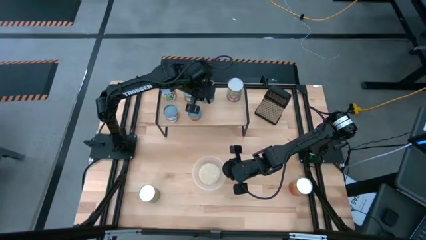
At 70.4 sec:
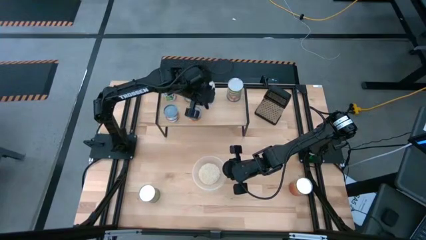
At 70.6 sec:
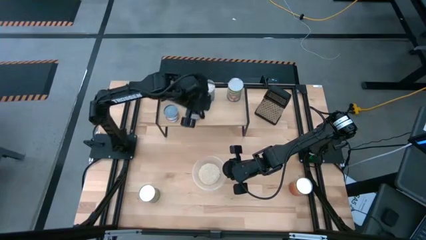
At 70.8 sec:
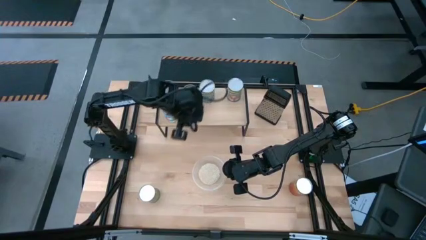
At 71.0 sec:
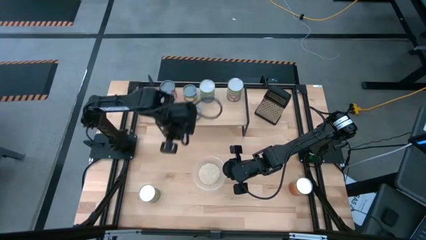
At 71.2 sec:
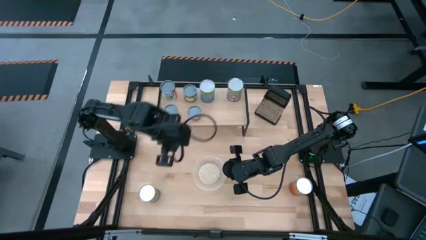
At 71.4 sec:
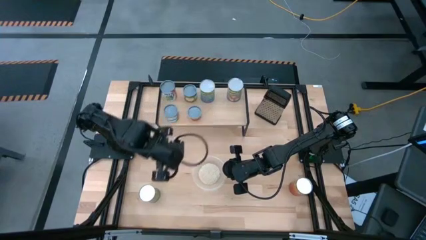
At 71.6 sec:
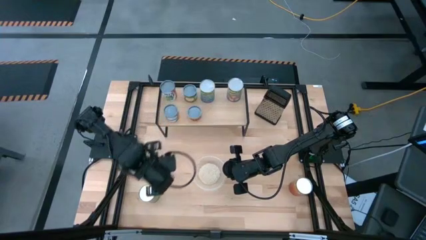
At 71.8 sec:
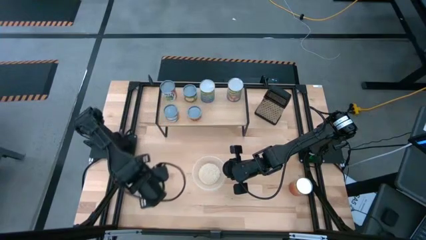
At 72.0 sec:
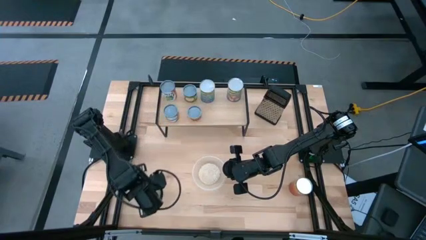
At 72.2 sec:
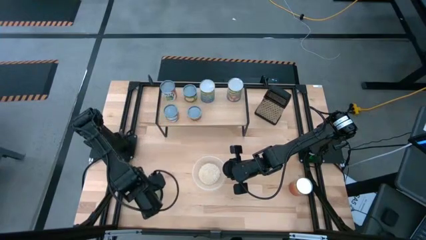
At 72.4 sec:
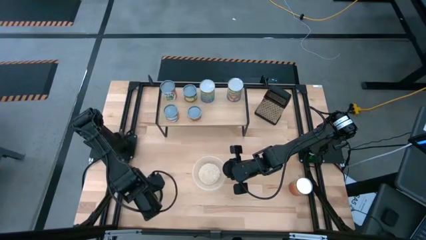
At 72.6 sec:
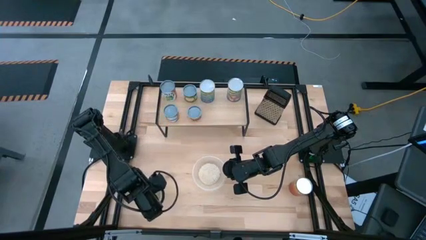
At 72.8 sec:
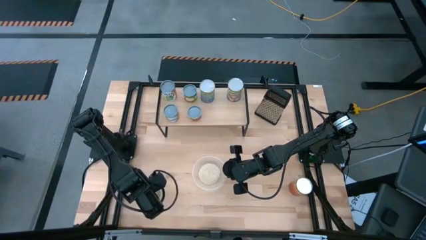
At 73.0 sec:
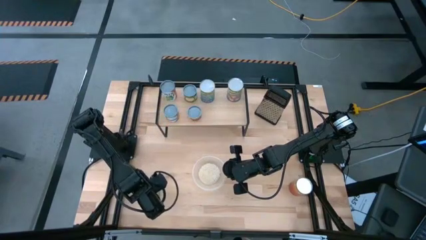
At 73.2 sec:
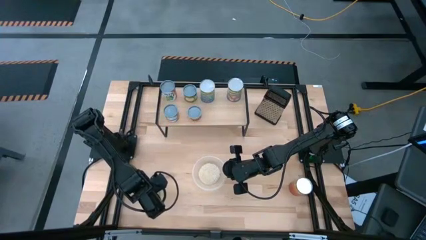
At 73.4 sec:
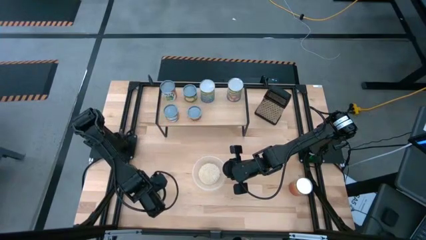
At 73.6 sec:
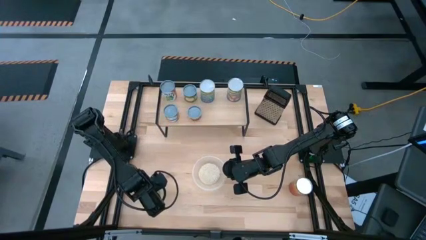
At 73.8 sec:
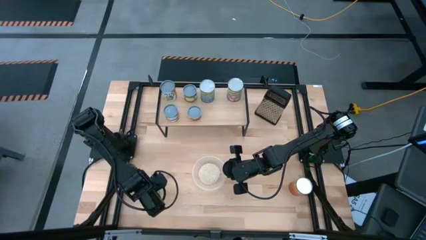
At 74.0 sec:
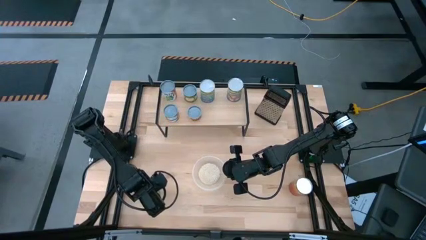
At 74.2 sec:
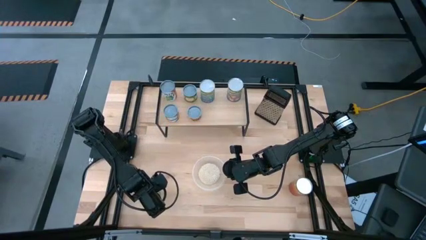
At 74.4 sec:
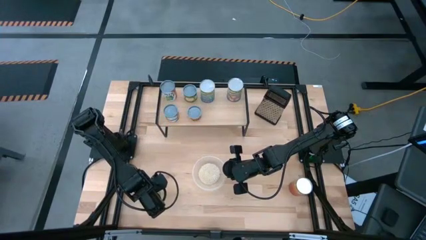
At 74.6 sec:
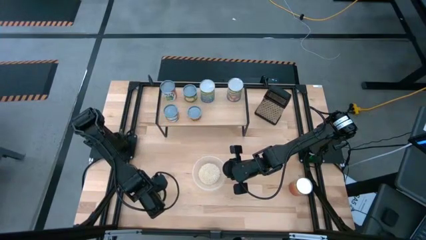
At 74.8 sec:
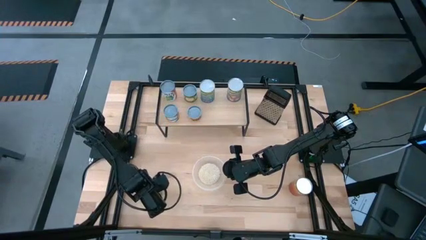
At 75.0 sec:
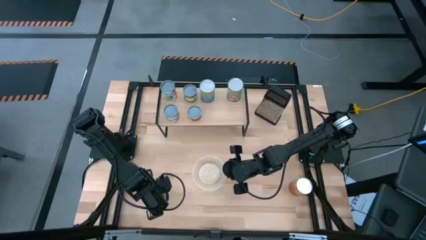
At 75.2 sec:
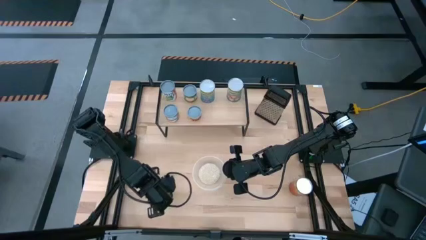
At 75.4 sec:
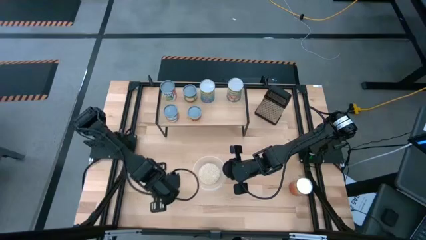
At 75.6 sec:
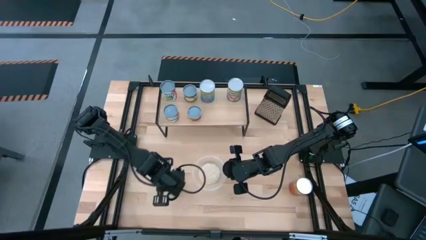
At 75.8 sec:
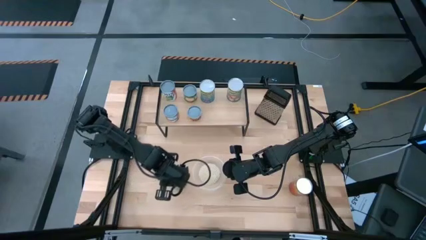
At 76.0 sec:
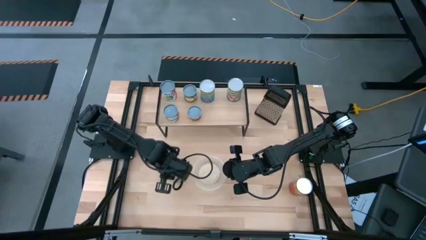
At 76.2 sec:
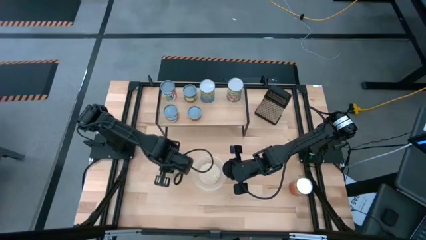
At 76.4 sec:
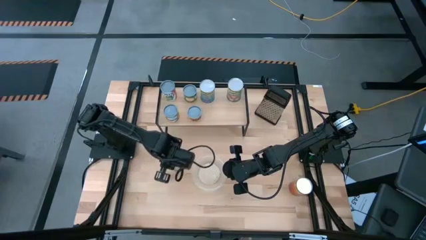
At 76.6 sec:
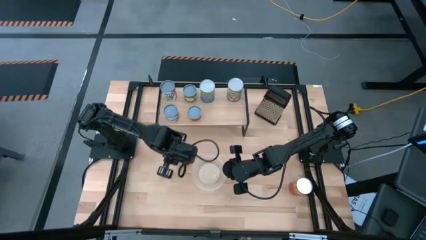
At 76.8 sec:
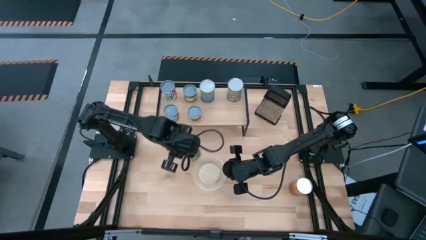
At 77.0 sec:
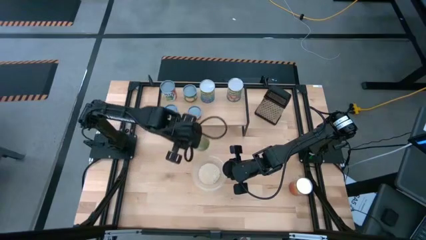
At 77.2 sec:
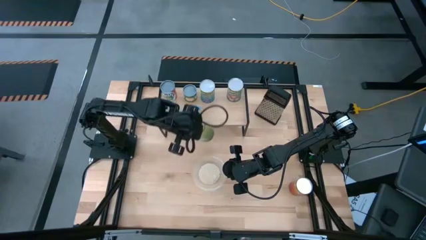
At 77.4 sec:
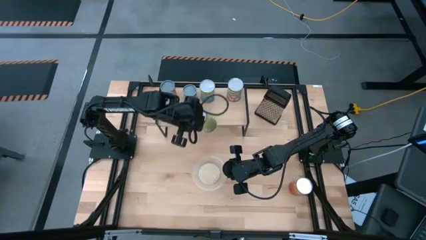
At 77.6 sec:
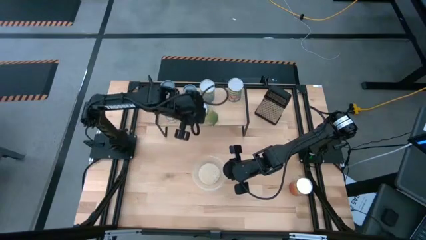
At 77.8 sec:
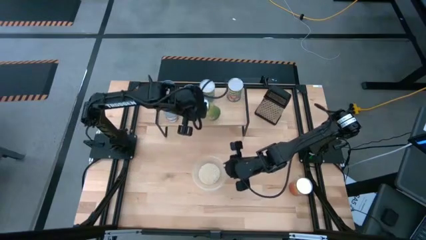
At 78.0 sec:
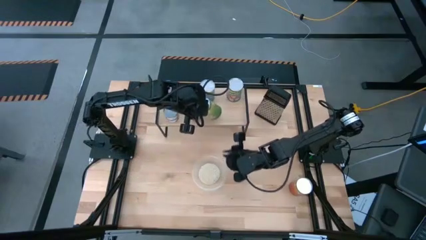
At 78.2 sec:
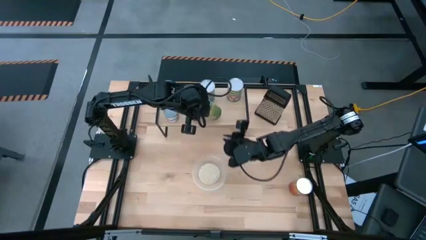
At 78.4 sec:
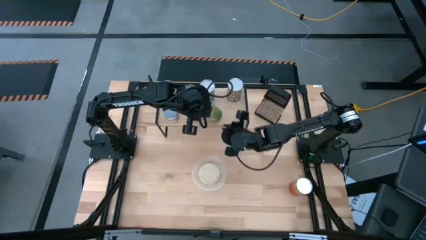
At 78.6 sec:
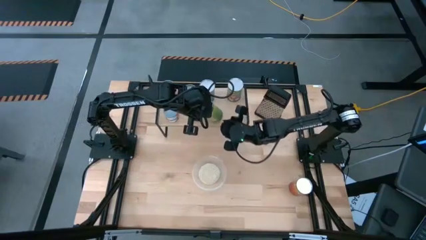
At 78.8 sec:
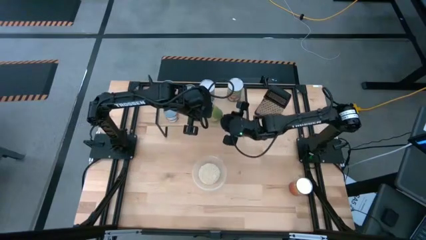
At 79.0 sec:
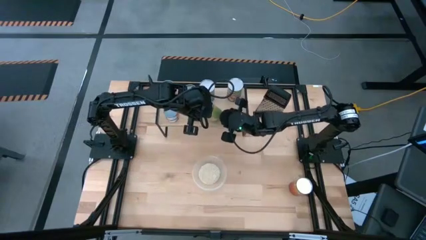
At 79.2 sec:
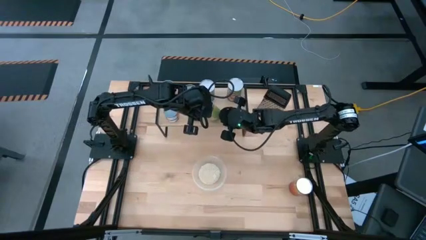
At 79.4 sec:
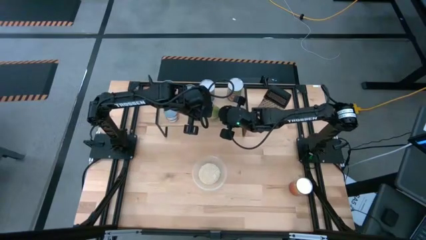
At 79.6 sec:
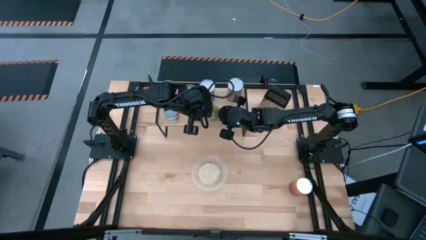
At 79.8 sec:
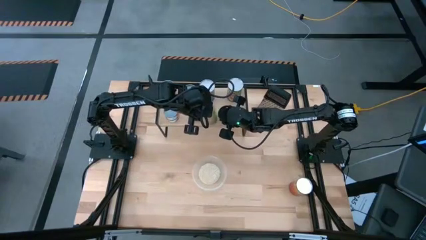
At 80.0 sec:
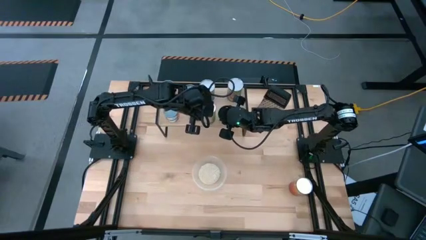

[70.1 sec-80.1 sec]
Task: Pick and place cans onto a shelf
Put the big canned oranges on the shelf

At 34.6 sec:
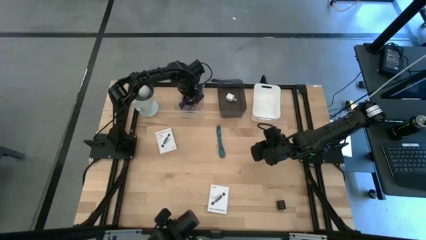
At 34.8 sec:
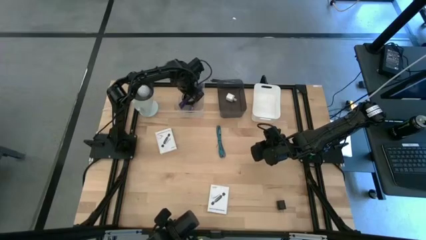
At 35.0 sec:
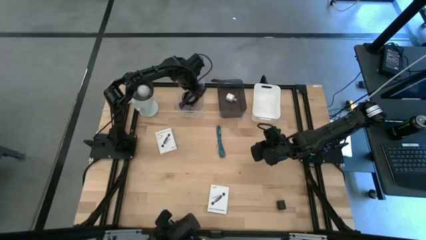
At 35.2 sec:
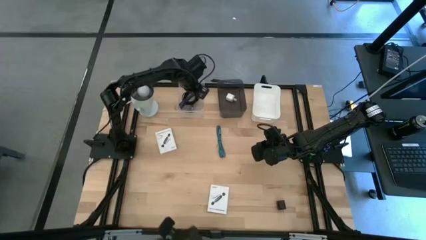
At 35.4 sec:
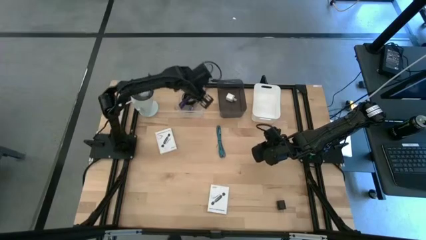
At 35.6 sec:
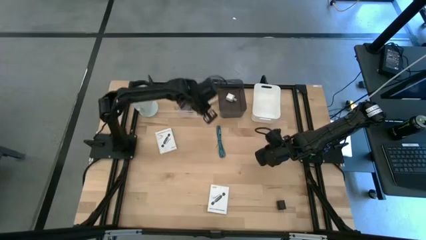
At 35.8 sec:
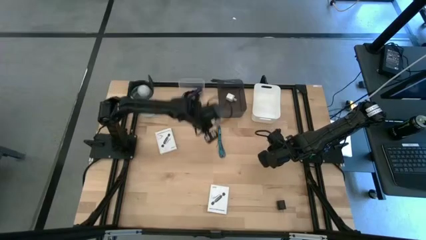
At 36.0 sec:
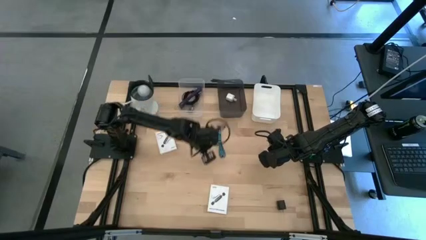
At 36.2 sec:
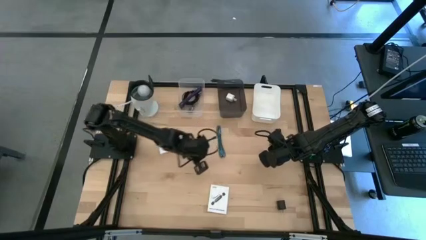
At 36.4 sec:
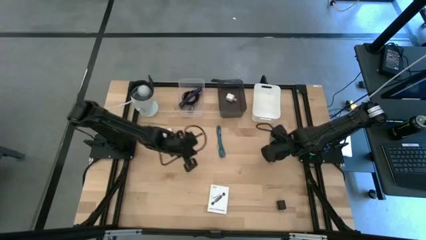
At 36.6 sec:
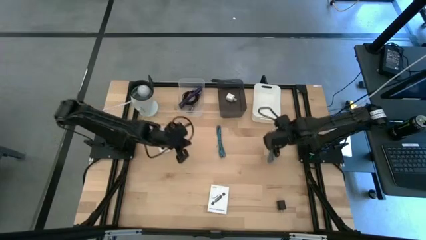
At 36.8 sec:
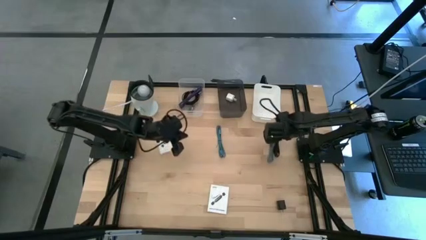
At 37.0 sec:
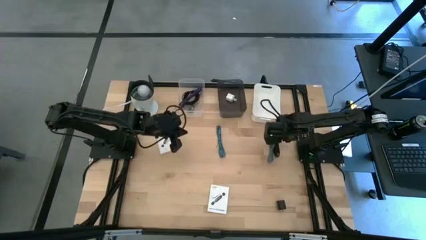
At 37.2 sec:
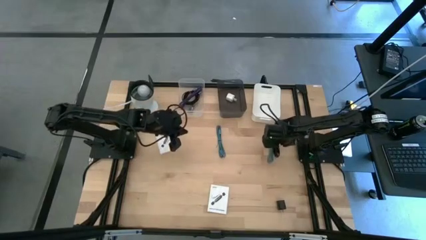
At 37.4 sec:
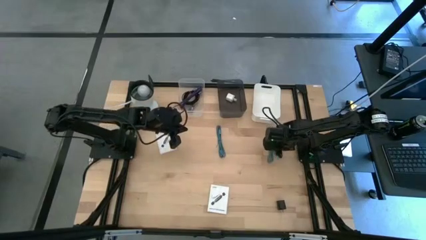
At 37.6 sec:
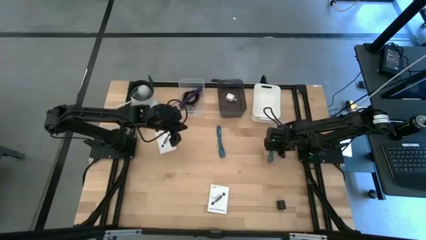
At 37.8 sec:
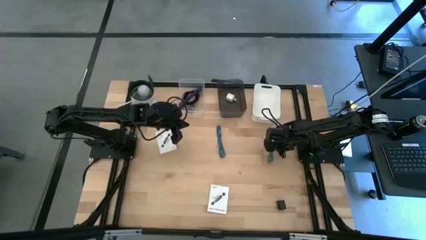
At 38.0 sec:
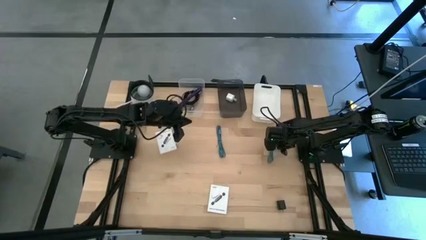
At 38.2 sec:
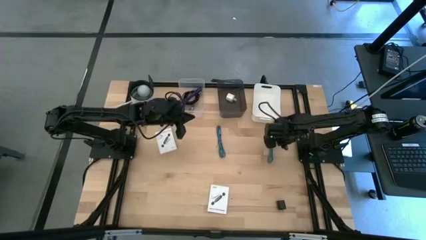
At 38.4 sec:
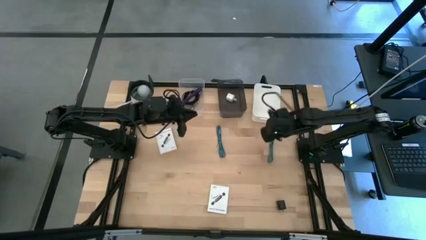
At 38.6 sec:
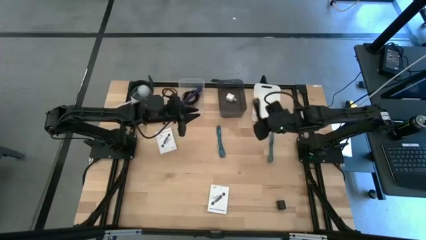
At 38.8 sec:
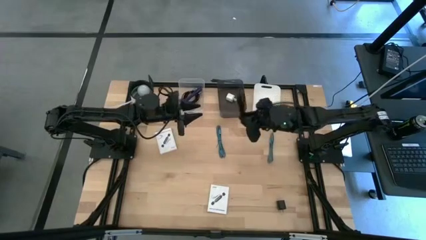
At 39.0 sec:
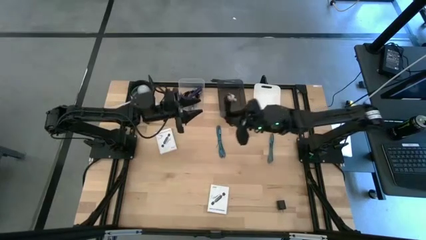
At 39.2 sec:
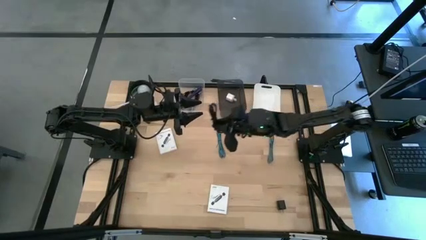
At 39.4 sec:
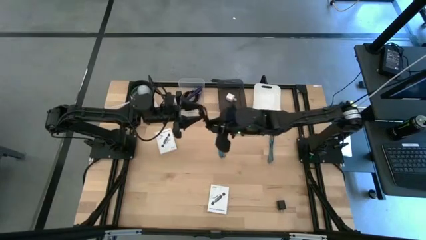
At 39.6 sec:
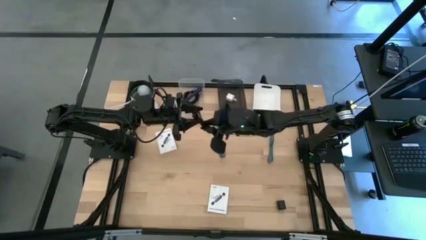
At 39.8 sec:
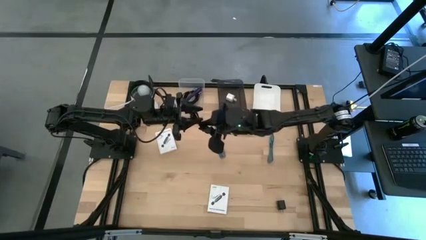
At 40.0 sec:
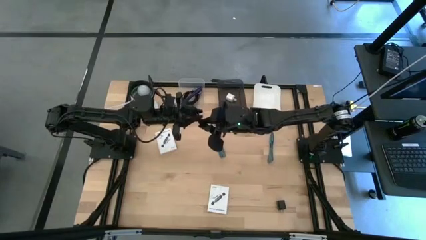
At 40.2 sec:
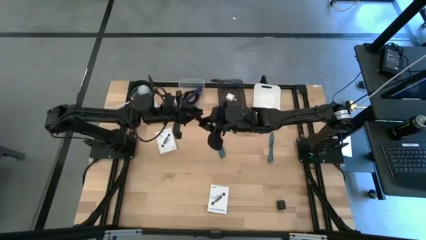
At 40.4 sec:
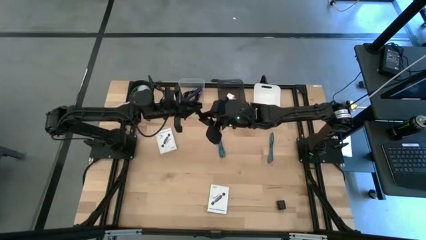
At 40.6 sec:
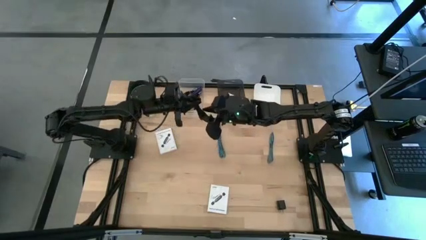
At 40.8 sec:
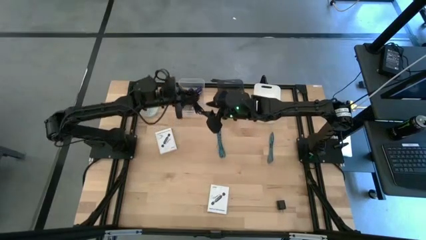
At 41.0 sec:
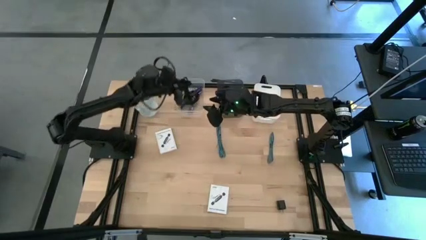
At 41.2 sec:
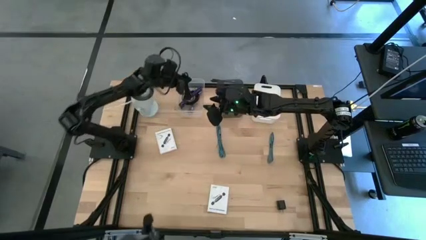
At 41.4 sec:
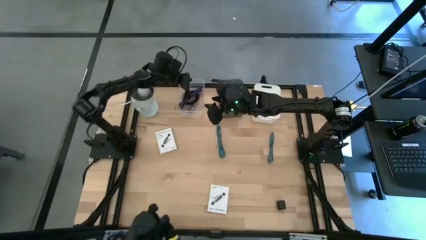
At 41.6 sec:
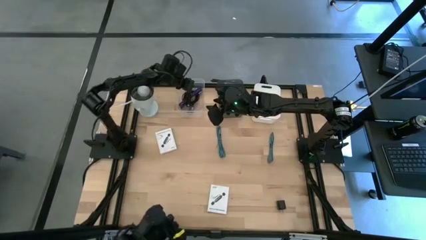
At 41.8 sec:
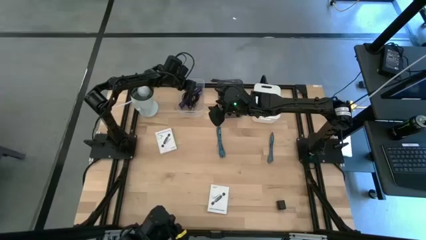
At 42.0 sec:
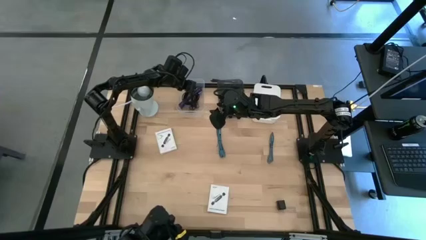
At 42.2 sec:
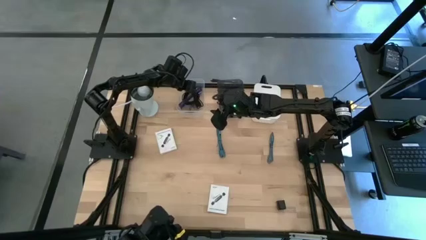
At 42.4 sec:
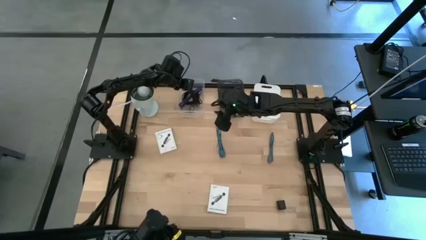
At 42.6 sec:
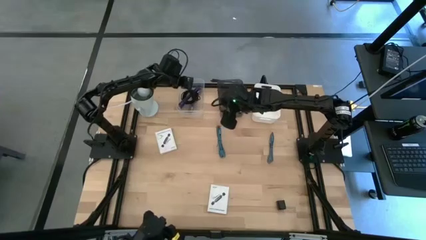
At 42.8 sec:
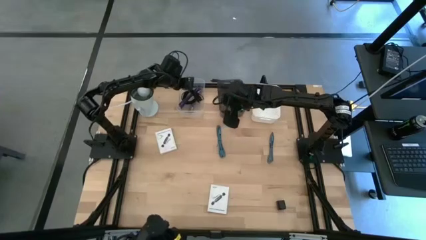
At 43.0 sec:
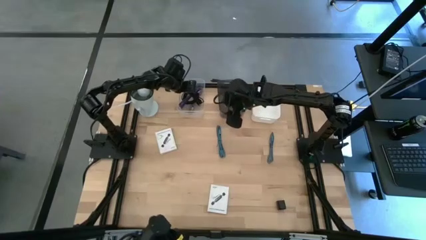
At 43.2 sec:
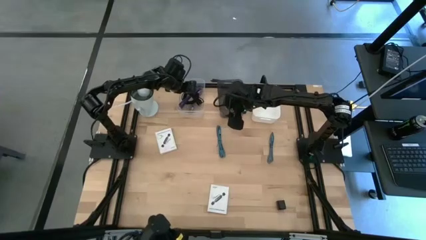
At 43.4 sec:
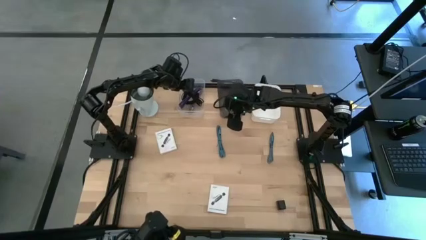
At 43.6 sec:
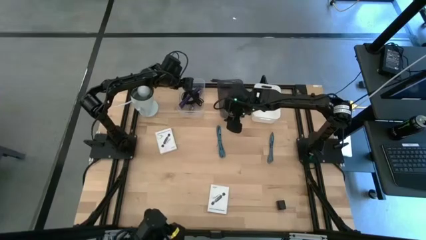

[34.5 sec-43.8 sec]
Task: Pick and place items into bin
Put the black charger cable into the transparent bin
